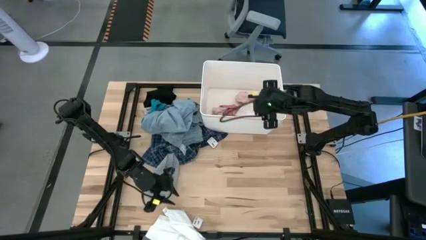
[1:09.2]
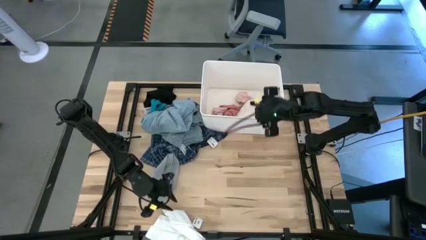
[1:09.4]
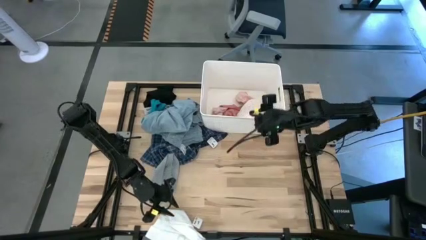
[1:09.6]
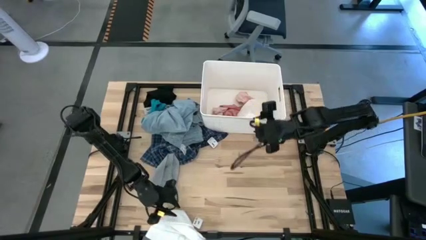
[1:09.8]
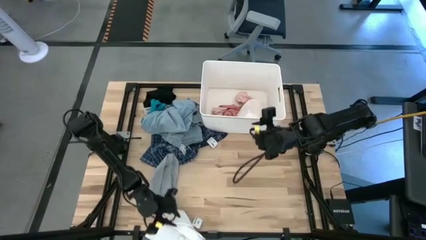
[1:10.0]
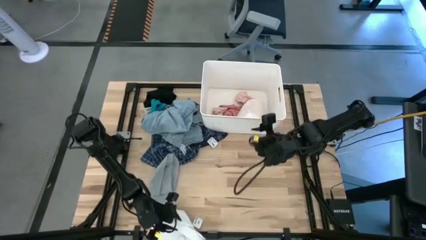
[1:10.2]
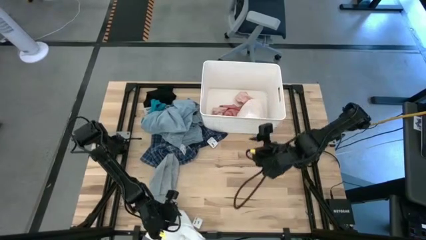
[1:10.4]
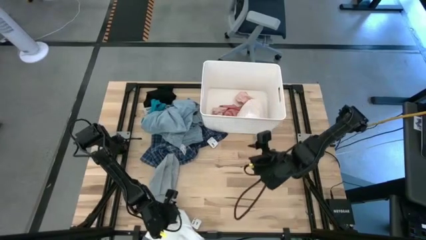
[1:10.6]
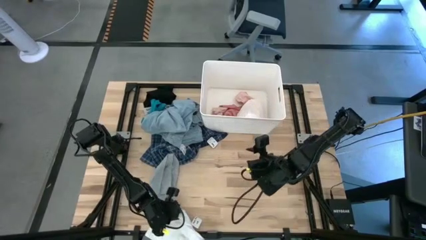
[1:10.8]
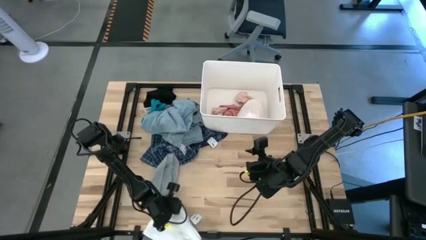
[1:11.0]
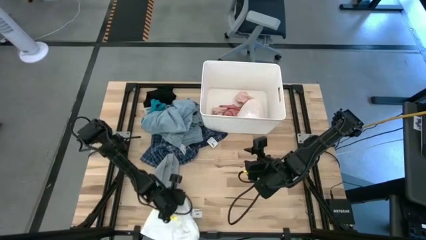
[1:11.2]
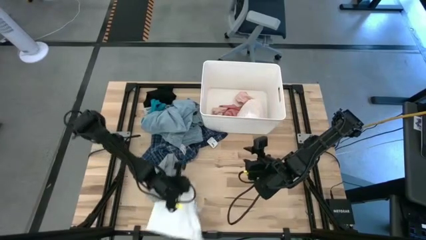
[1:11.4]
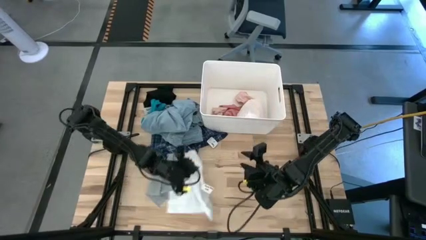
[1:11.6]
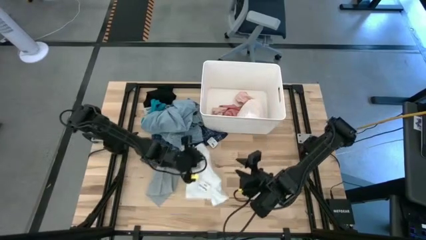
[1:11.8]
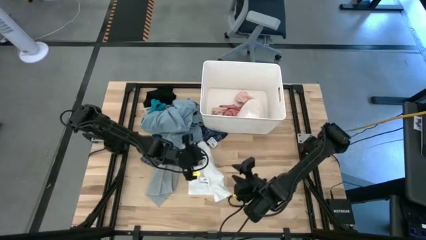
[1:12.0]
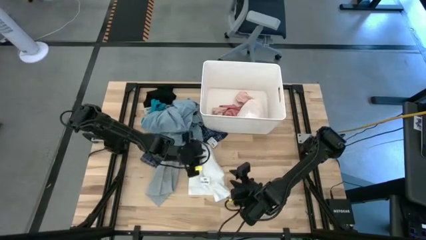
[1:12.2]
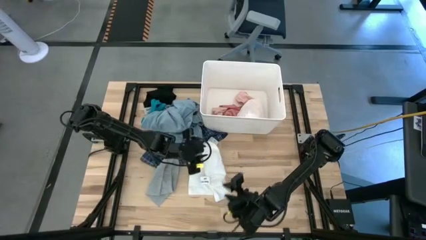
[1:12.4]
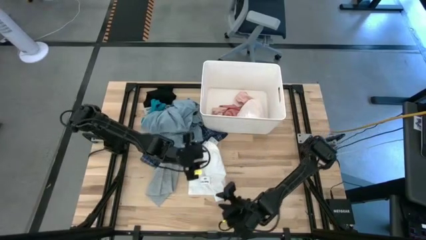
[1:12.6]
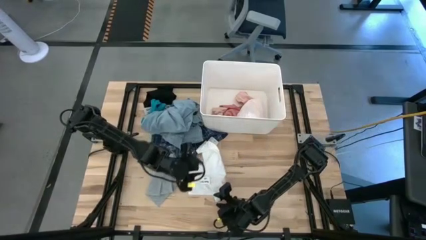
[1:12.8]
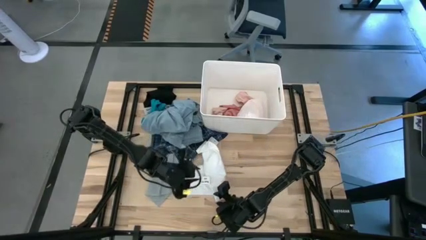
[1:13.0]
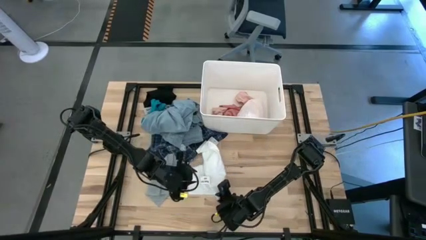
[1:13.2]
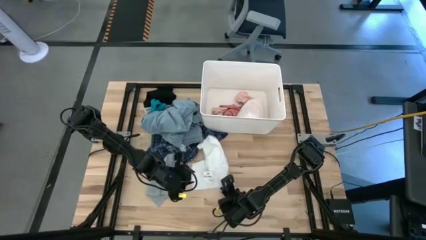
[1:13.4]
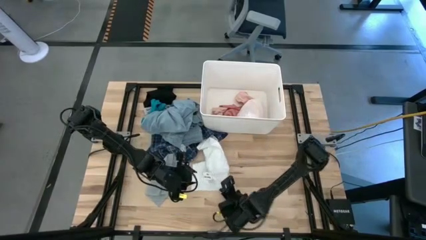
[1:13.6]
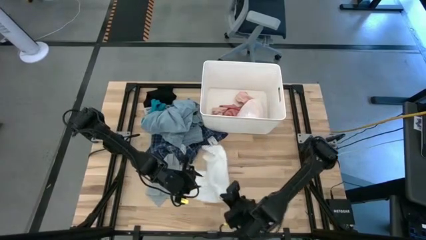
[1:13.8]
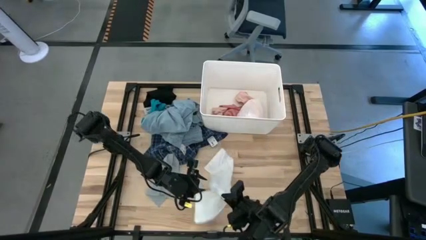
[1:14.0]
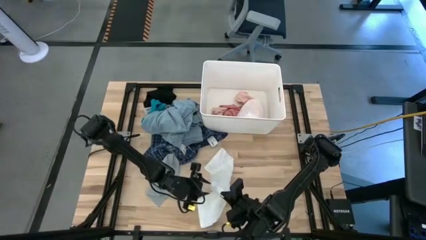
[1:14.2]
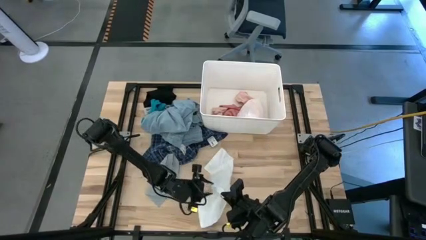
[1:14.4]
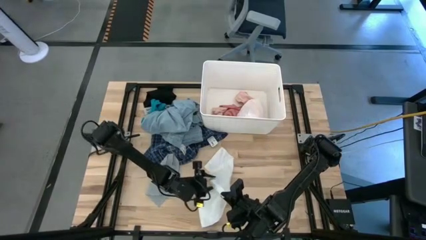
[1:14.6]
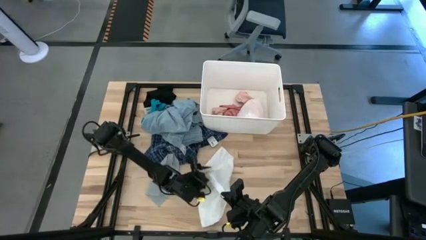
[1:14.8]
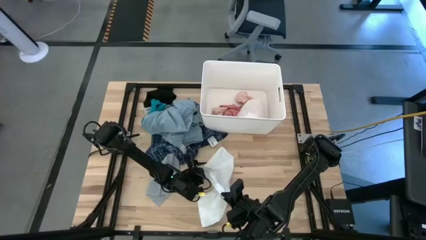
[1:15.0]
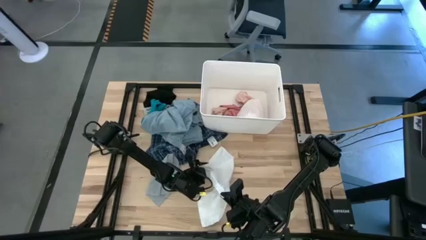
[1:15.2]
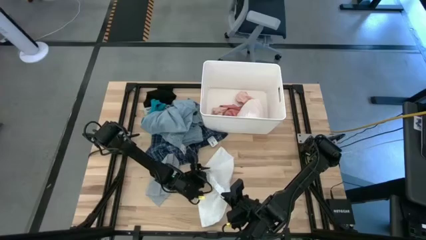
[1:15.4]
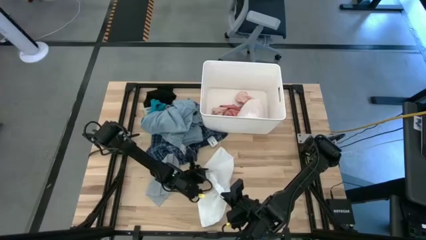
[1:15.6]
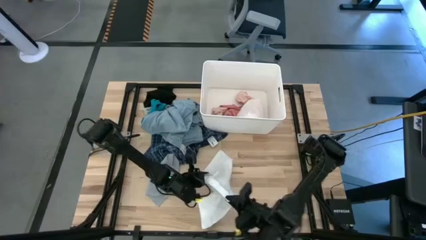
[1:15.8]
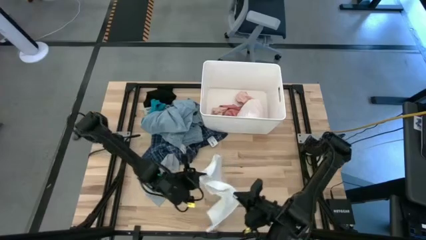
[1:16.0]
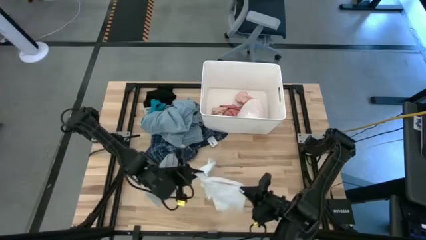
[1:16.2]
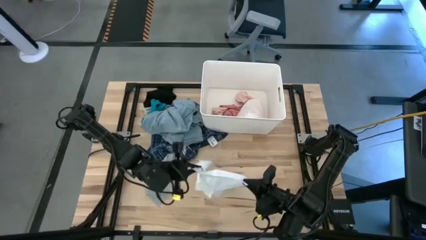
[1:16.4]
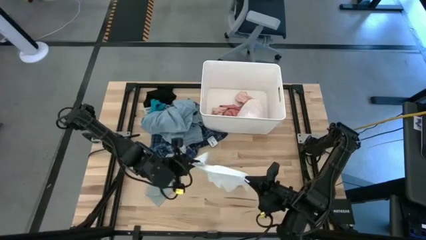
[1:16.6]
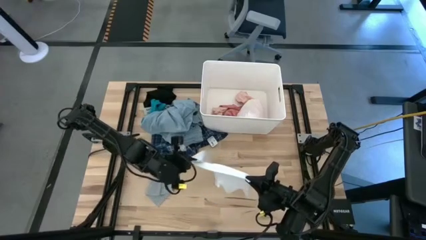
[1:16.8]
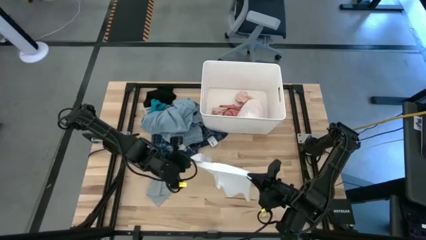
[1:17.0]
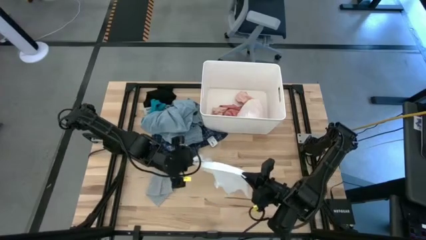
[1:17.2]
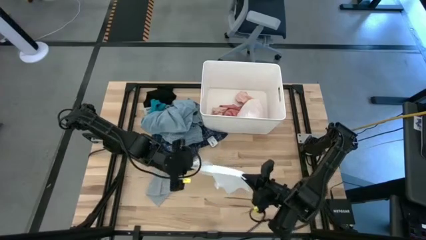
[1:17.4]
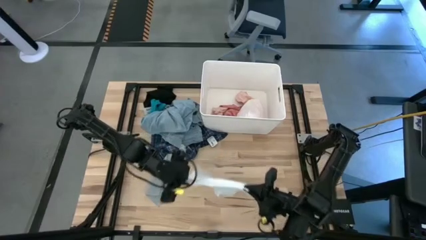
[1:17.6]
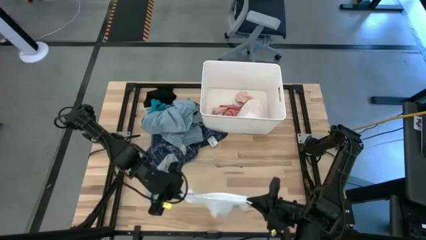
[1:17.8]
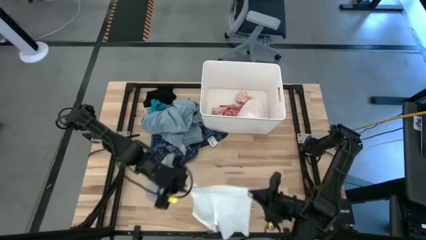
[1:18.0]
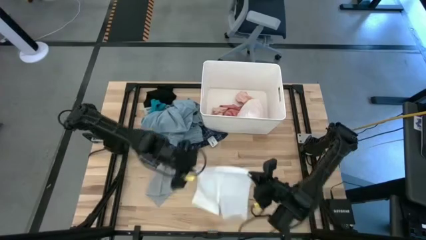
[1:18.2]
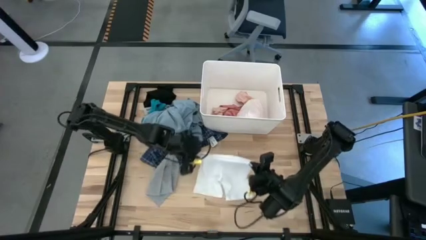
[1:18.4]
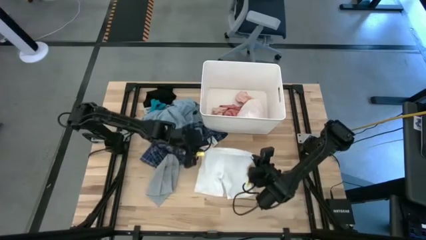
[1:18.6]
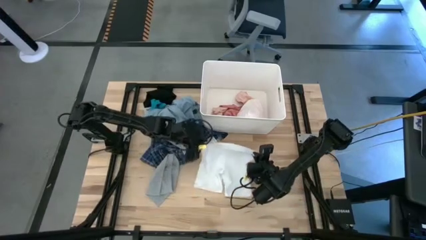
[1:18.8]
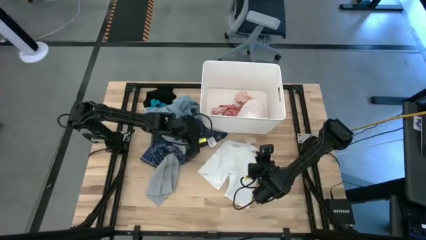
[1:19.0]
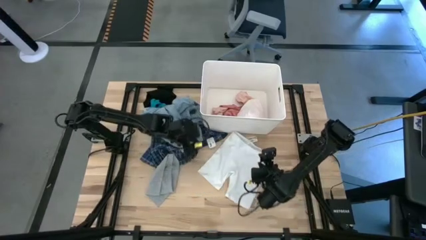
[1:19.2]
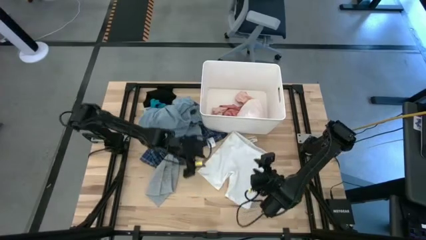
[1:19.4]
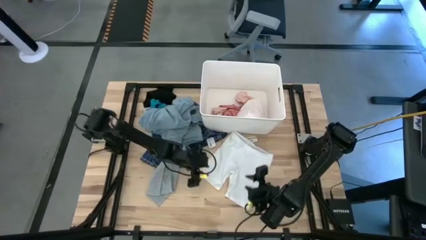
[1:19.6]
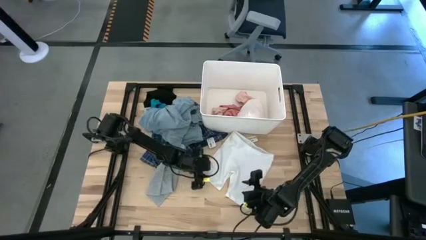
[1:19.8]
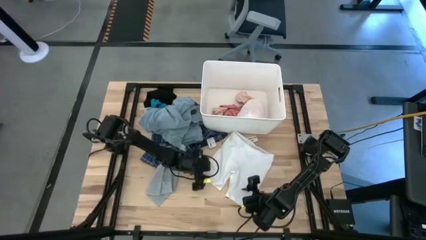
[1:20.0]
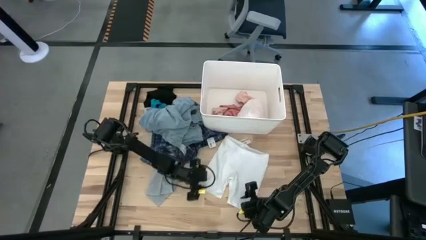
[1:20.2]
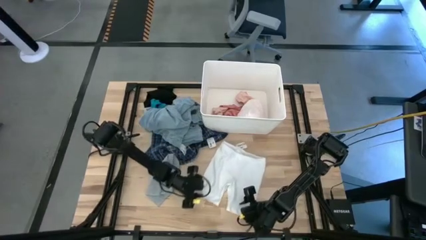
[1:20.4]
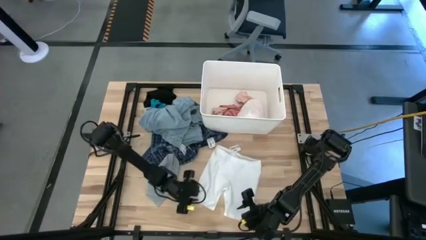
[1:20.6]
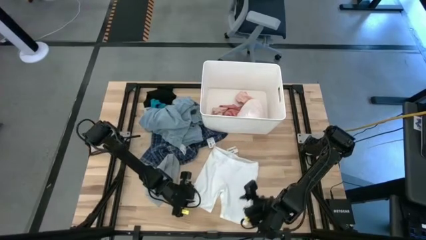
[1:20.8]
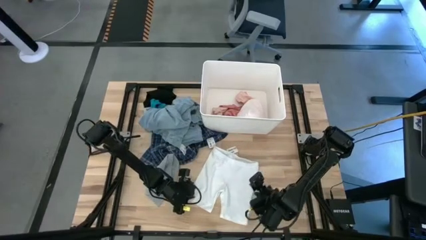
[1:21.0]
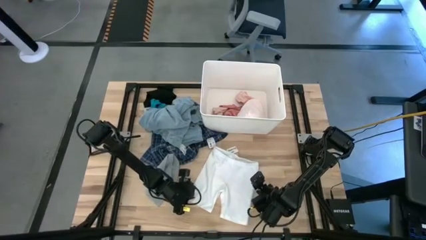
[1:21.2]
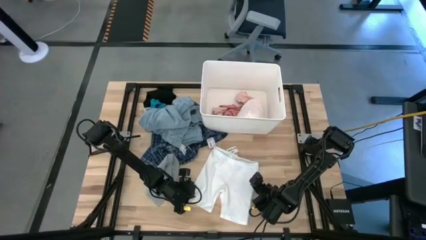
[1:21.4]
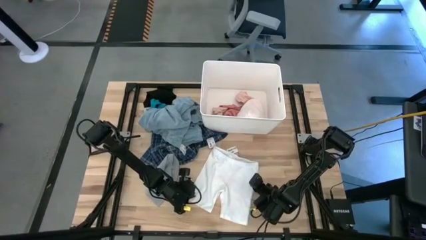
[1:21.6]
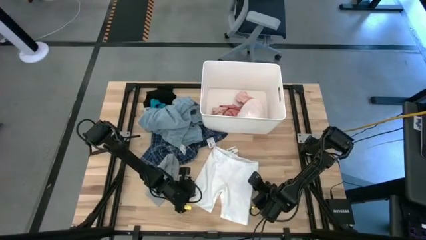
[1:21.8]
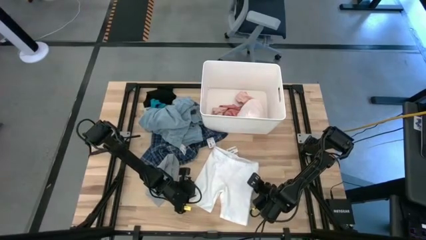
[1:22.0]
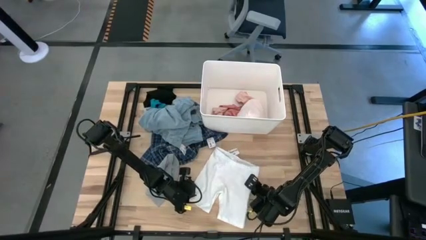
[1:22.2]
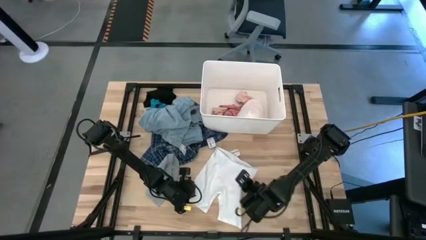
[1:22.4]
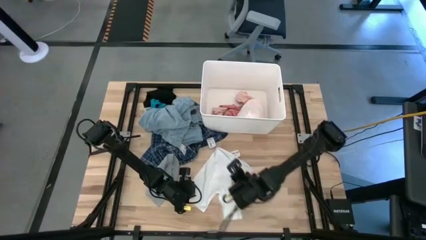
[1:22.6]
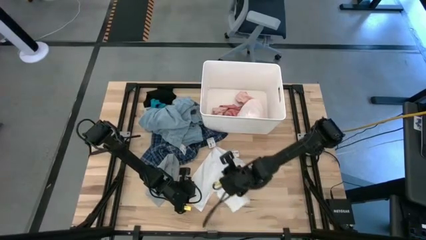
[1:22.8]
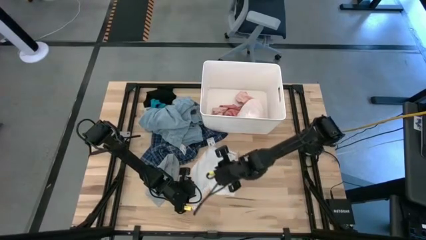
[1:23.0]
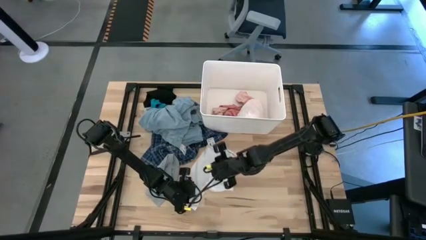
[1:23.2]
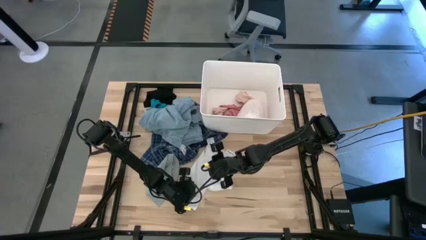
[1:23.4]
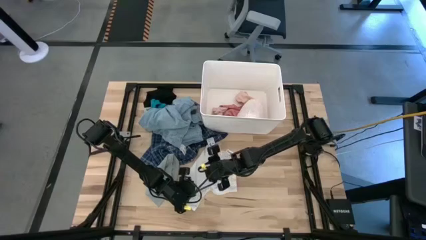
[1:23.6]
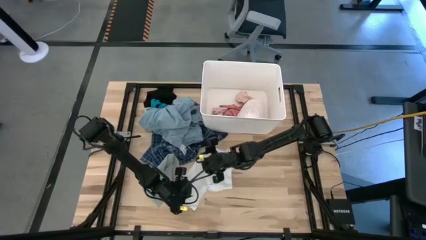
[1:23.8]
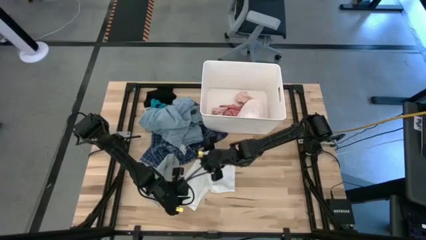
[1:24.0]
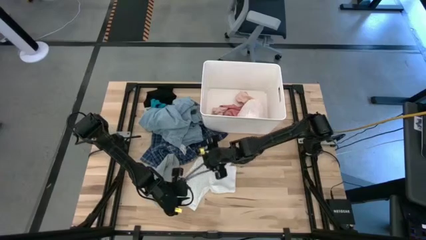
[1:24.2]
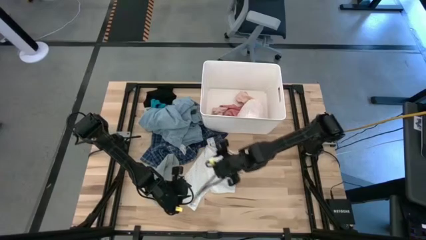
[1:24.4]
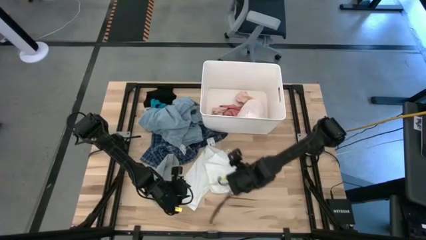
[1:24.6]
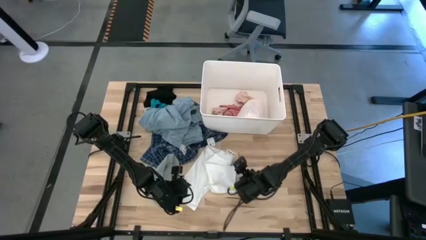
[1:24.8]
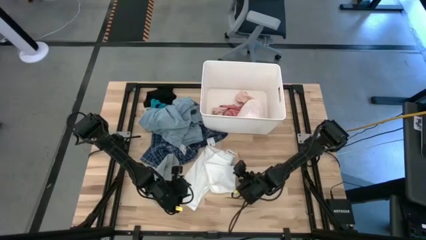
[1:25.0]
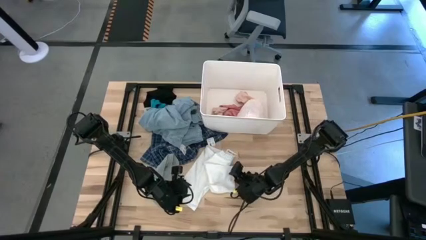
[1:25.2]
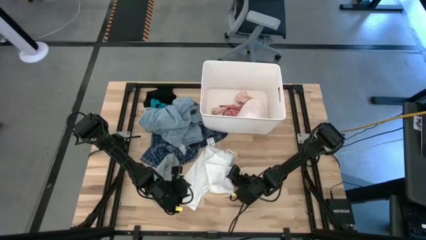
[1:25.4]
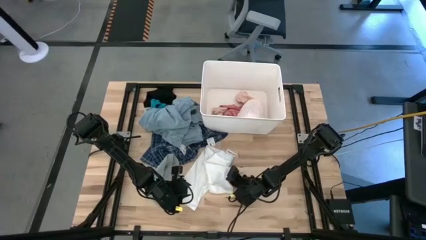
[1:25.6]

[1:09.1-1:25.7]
Task: Sort clothes
Put the white boxer into the white laundry bin
